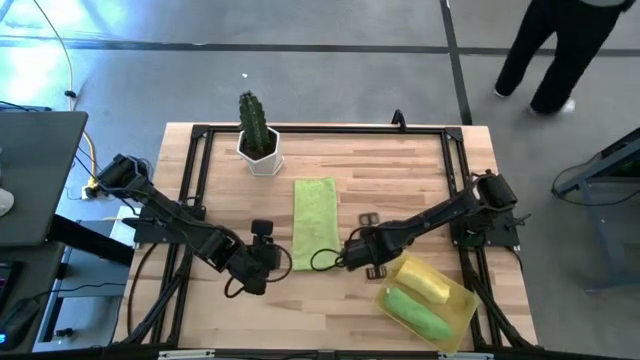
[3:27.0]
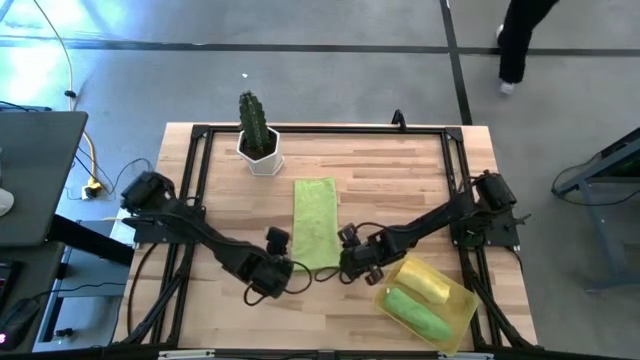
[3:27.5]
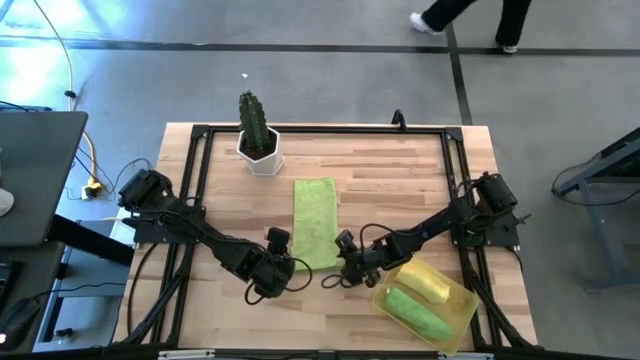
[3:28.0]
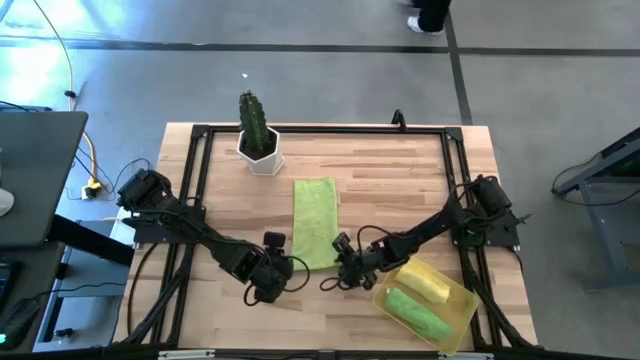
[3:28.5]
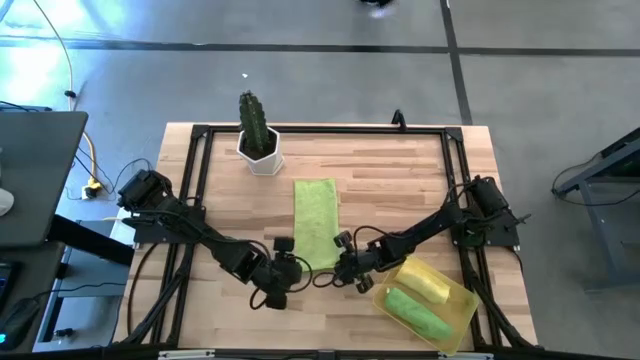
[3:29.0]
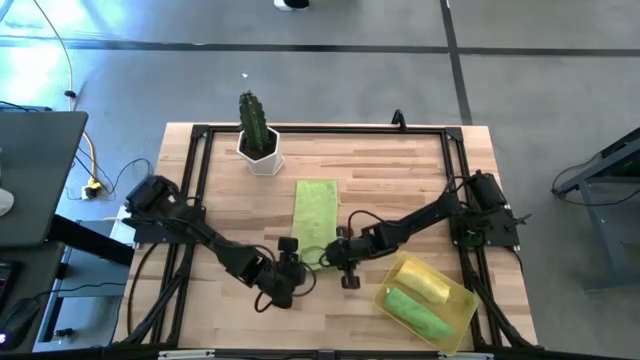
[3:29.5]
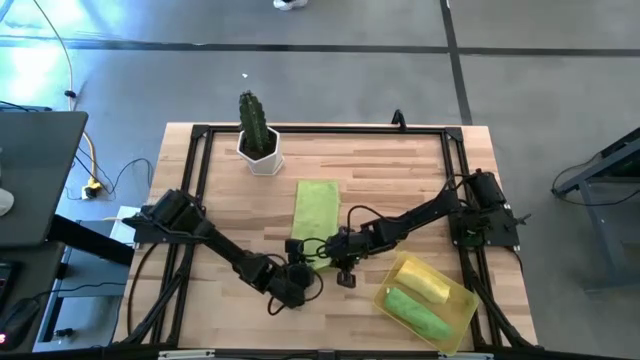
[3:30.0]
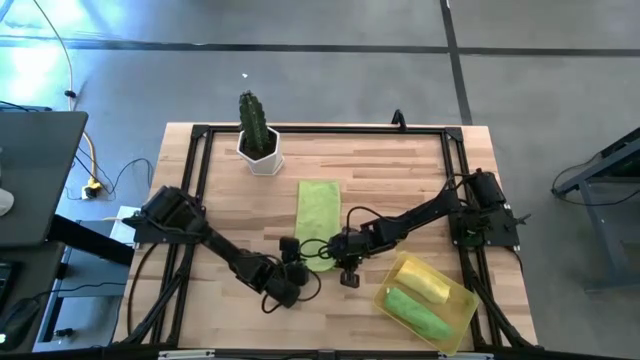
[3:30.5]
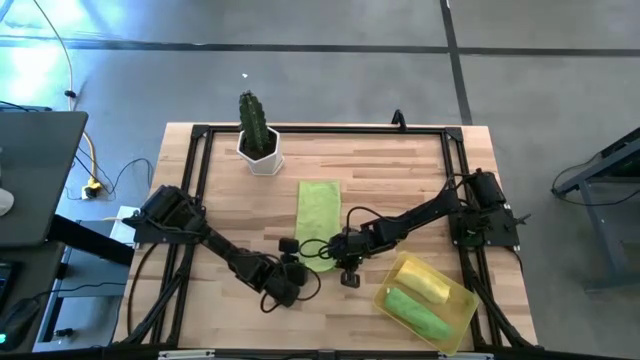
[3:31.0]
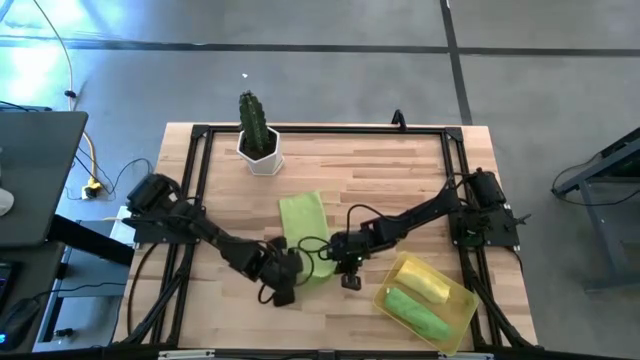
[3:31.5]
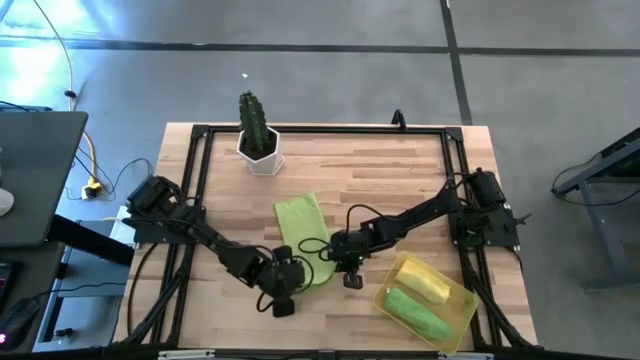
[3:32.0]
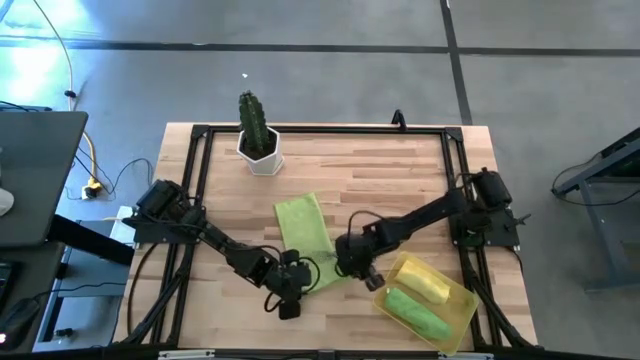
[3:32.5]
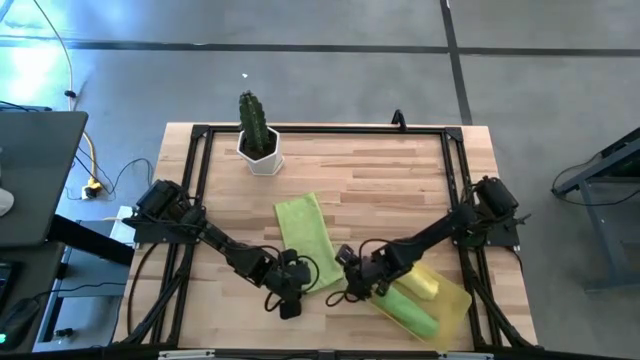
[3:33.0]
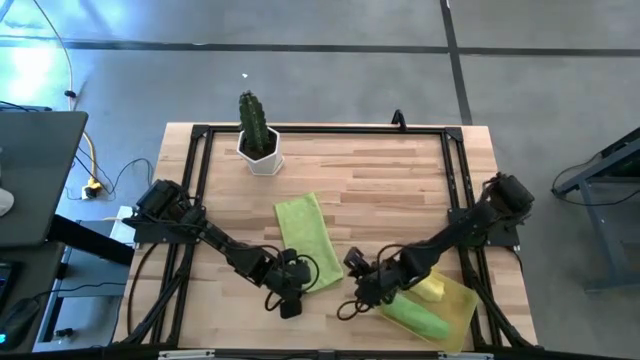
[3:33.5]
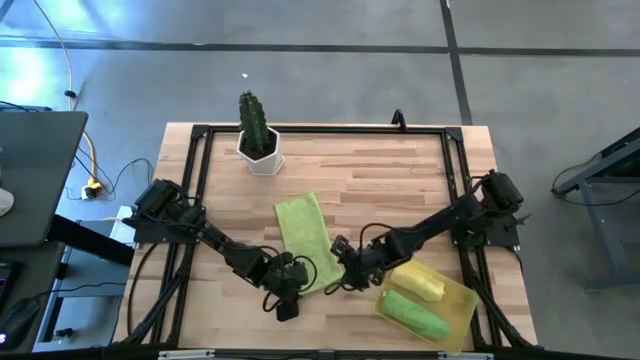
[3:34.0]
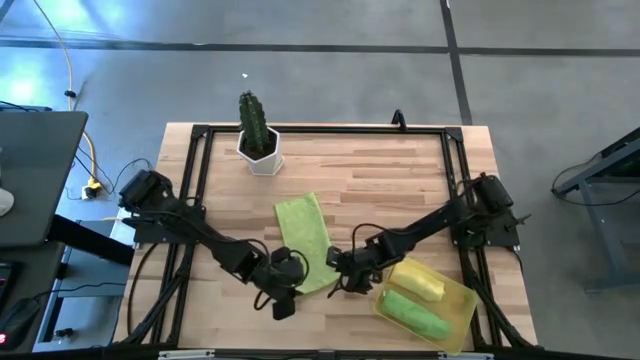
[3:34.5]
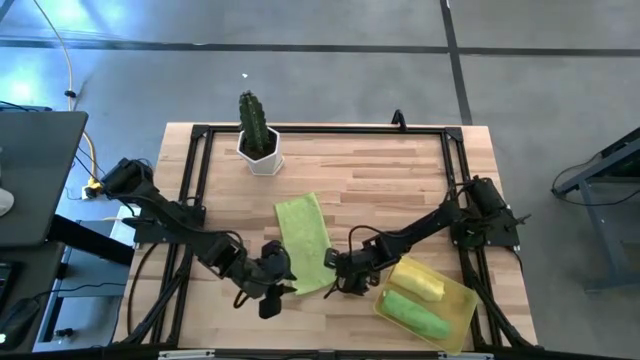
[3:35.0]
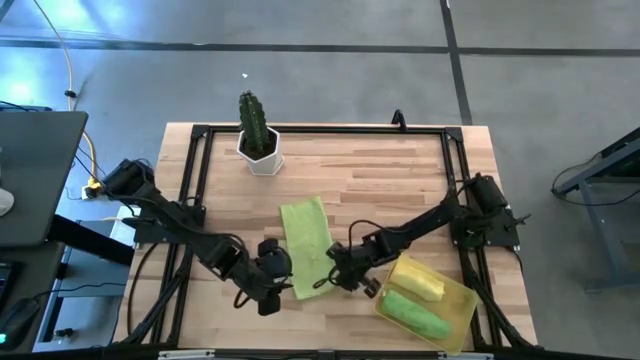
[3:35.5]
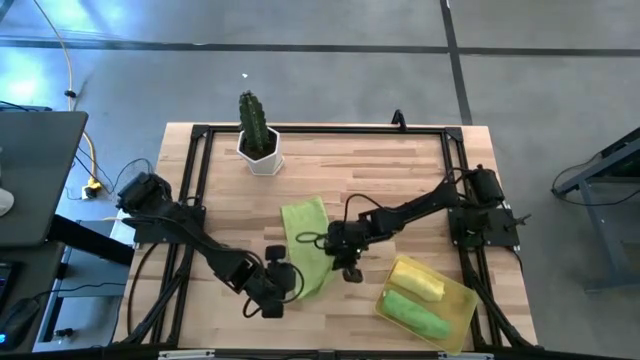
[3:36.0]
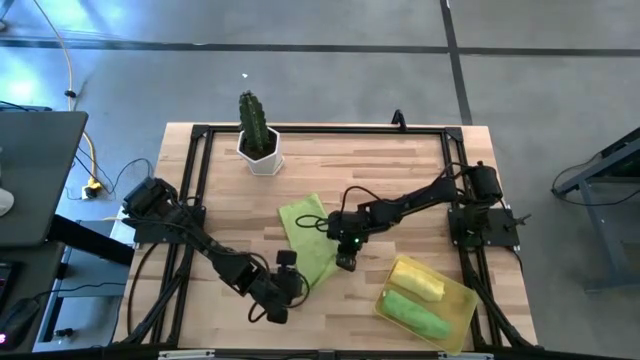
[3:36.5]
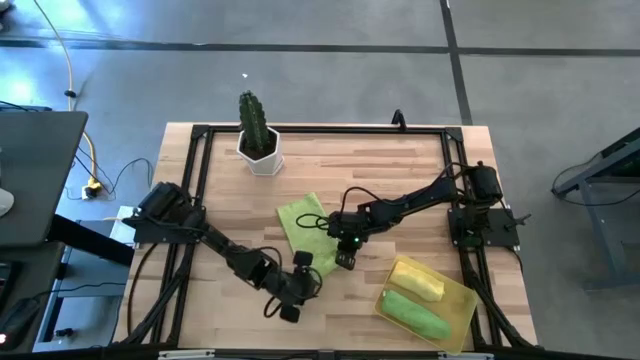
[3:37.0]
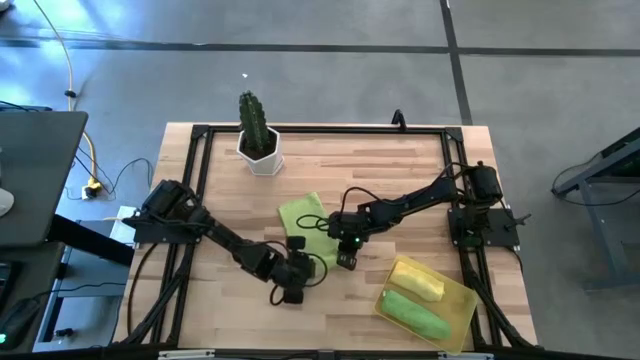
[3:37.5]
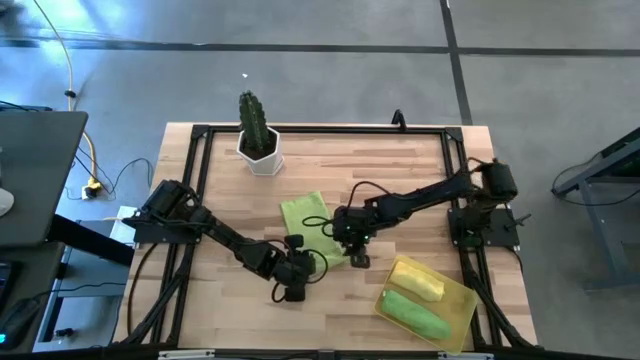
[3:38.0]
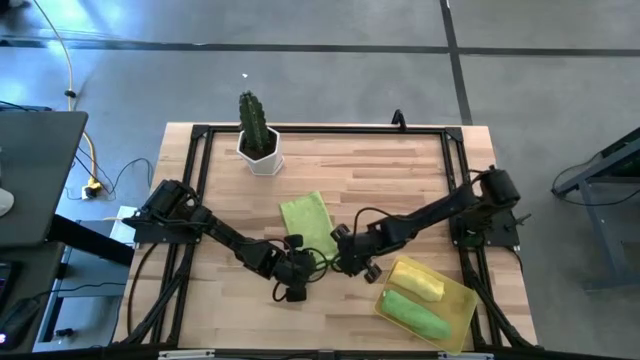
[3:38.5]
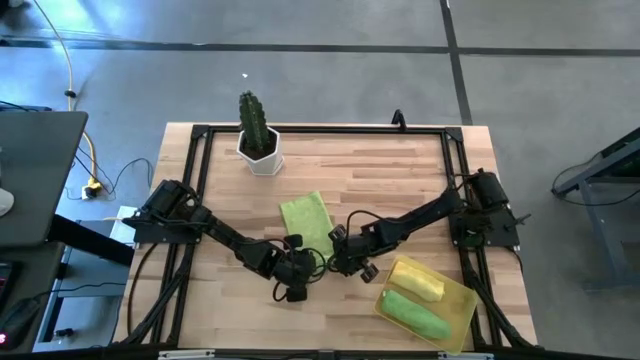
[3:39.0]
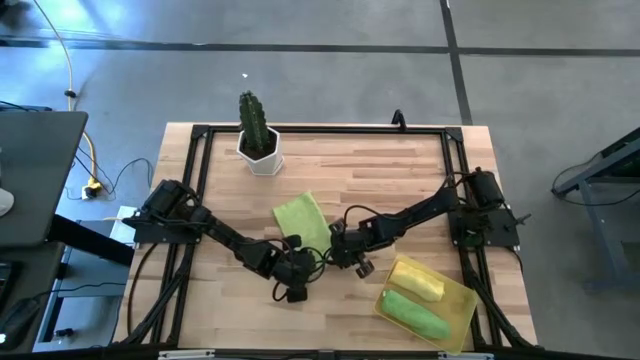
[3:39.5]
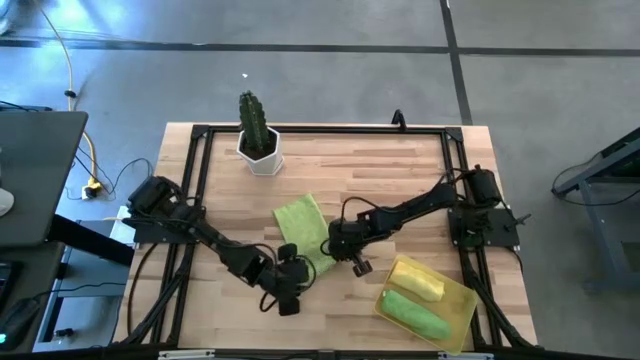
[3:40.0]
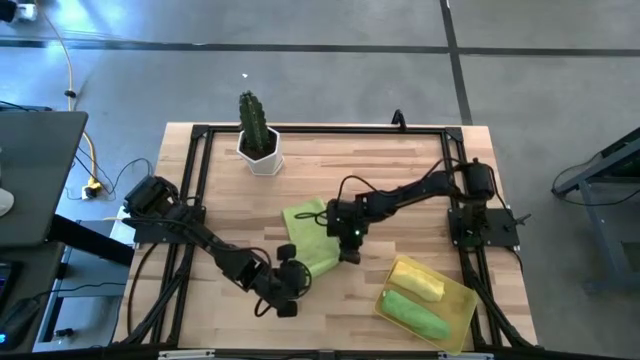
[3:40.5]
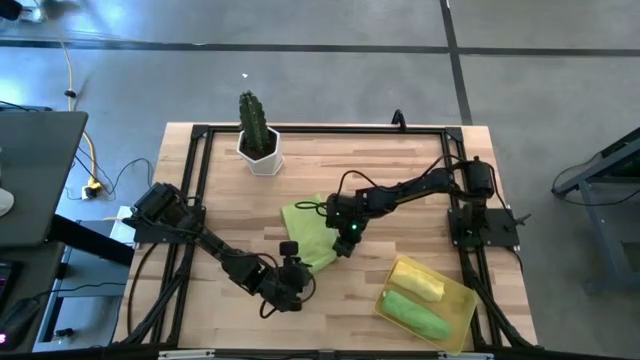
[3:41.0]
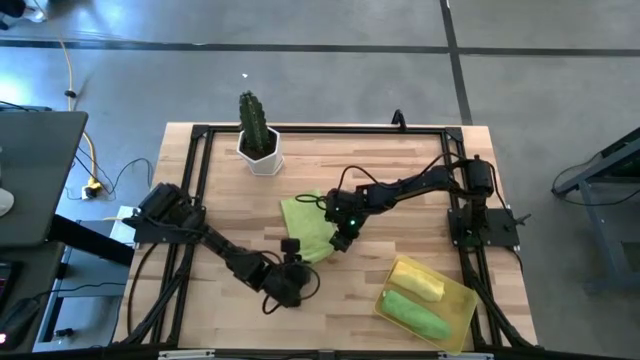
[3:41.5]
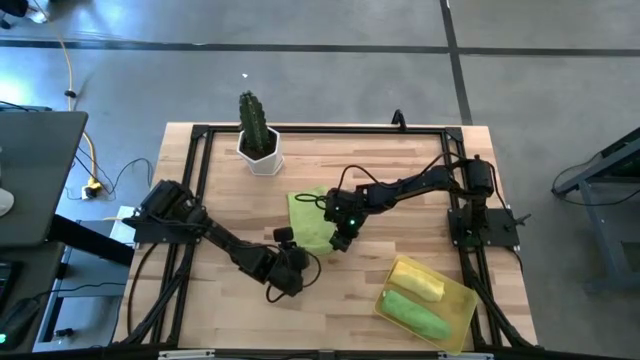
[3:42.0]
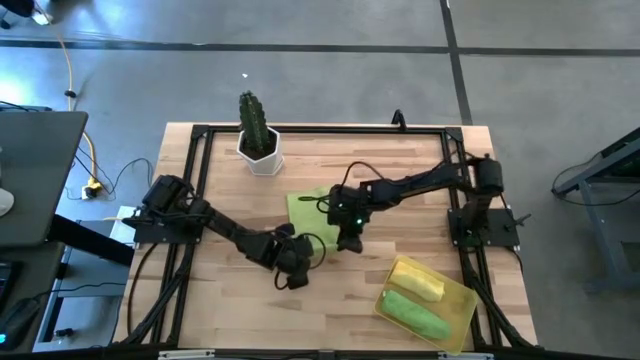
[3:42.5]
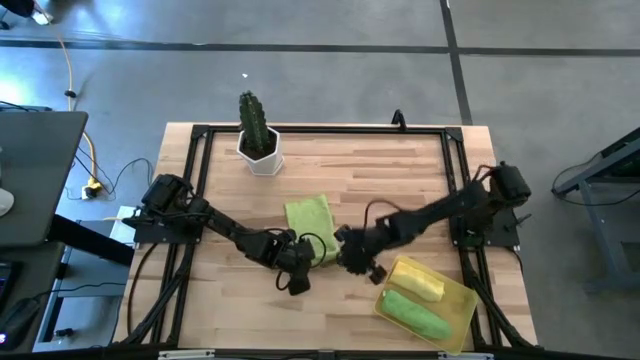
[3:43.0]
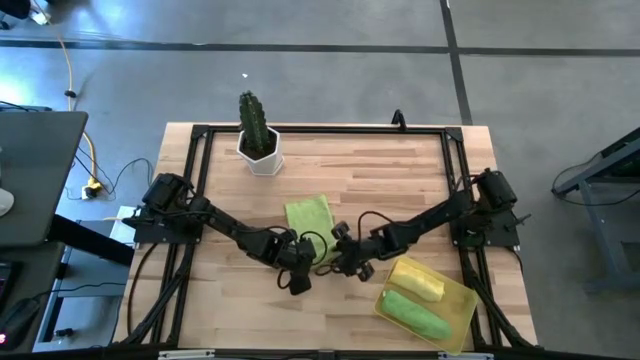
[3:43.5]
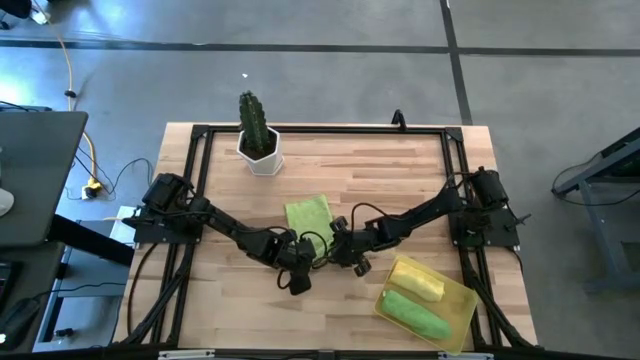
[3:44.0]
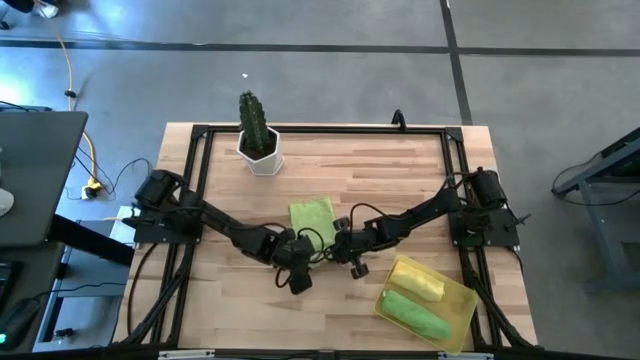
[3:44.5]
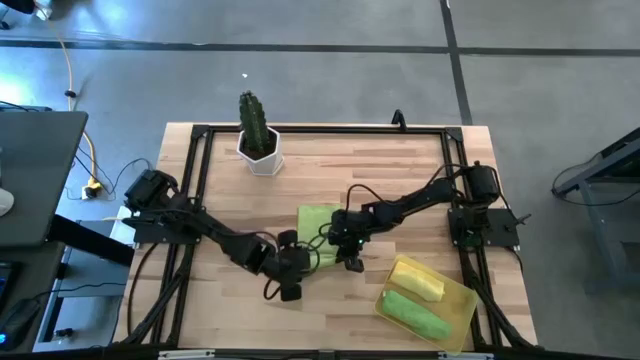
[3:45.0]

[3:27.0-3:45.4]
Task: Roll microfiber towels into tight, uniform cylinder then place into a basket
Roll the light green towel

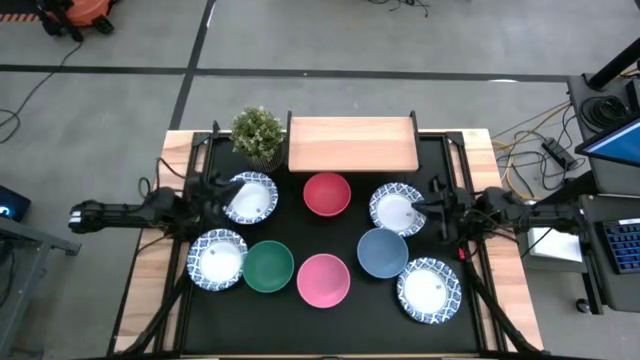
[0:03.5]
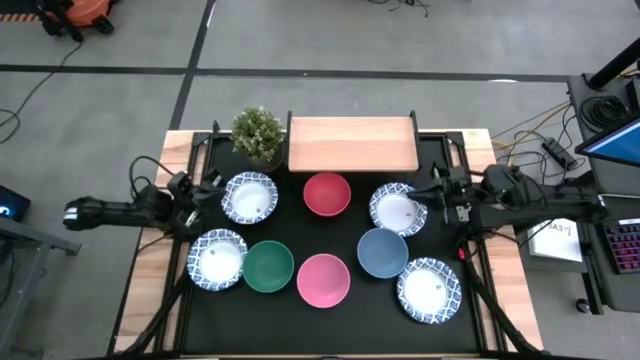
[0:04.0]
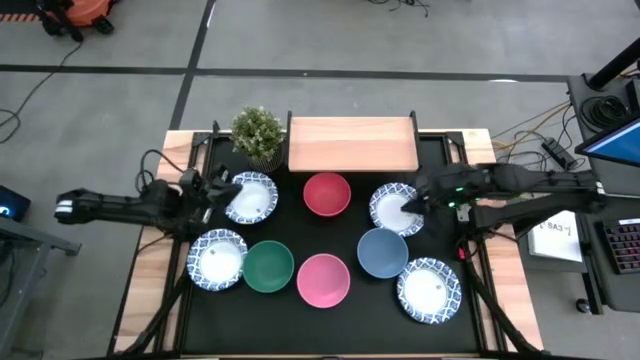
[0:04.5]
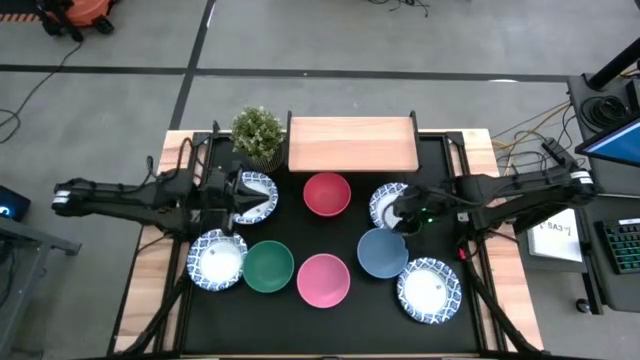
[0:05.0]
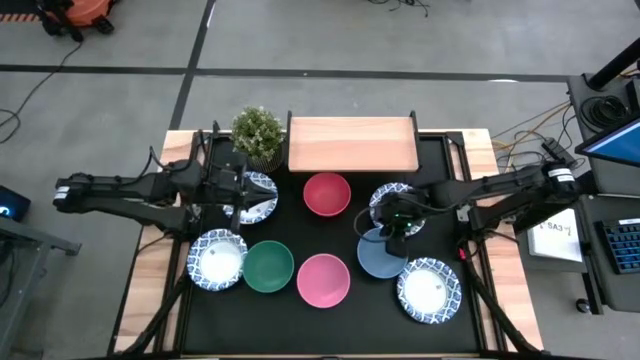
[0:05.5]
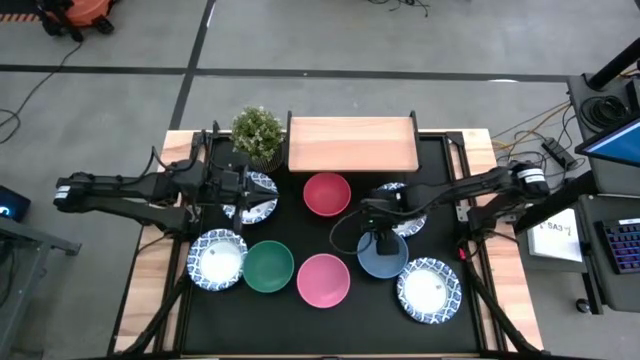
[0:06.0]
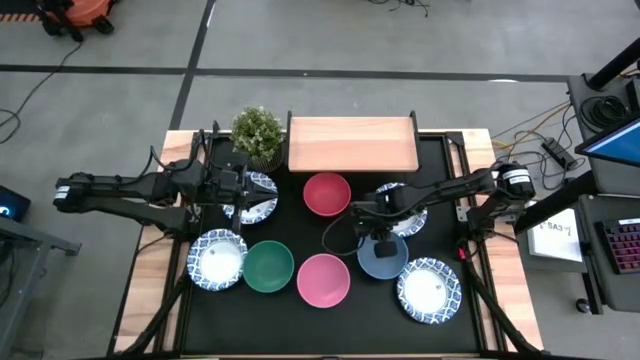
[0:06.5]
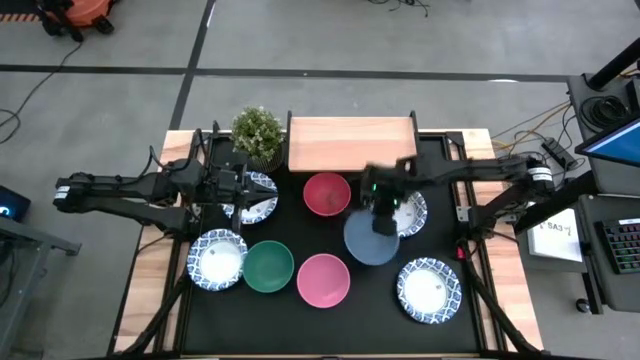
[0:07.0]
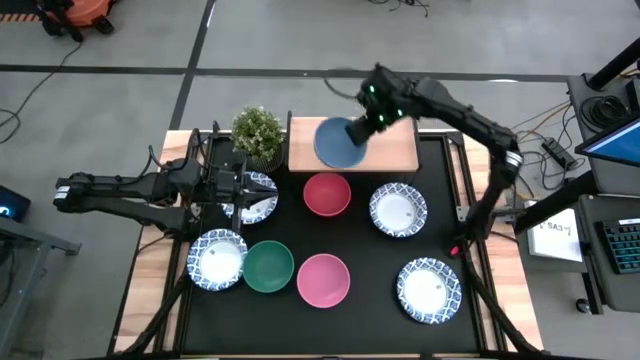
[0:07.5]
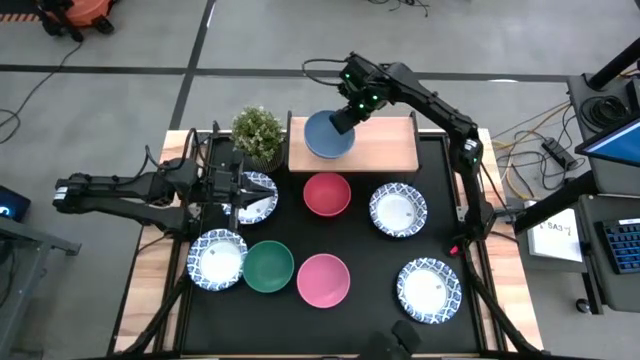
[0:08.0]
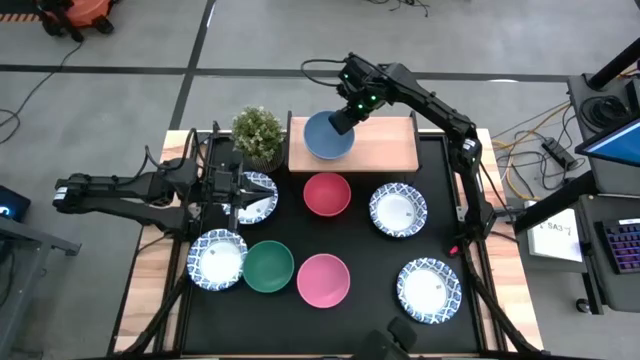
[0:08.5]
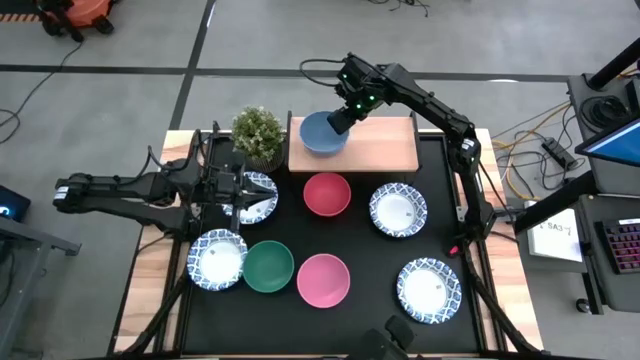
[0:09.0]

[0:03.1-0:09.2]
Task: Place and stack bowls onto a shelf
Put the blue bowls on the shelf
